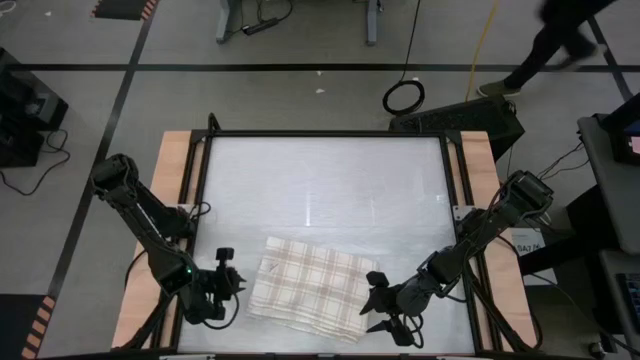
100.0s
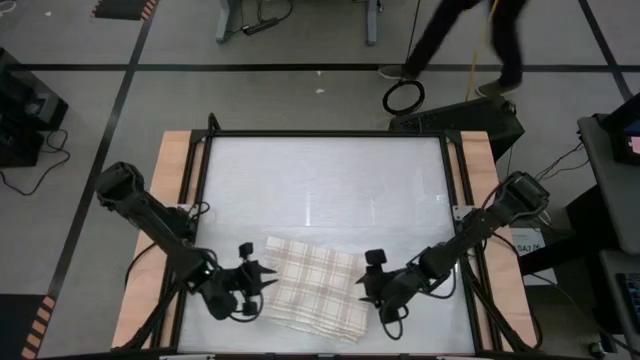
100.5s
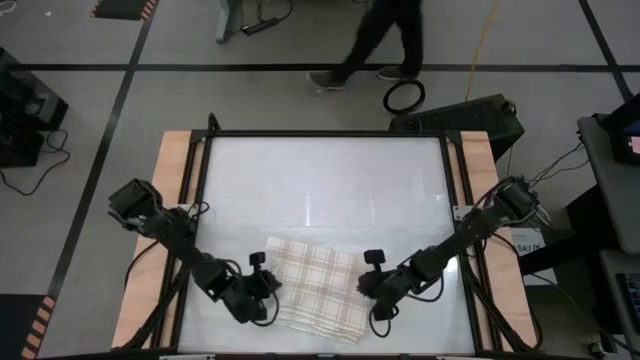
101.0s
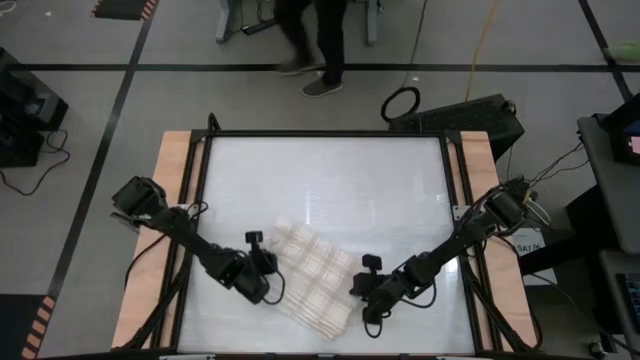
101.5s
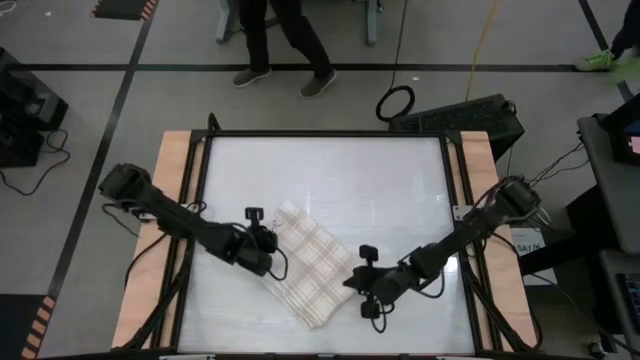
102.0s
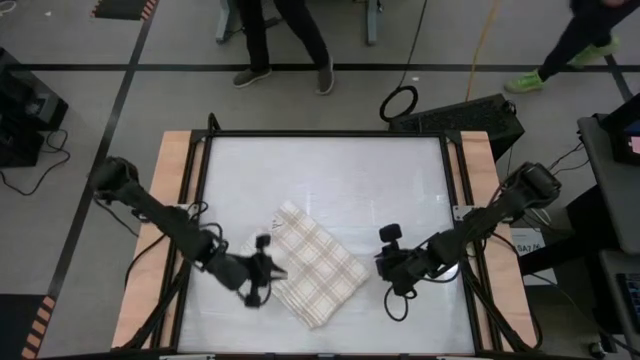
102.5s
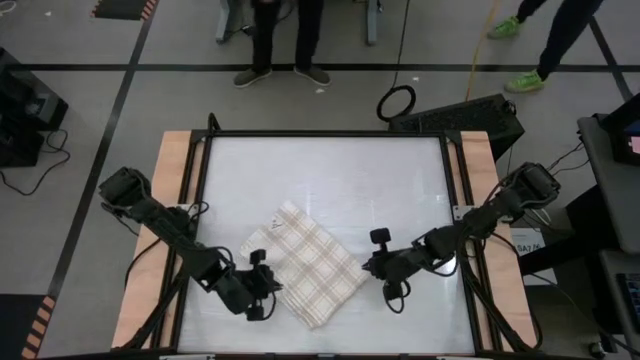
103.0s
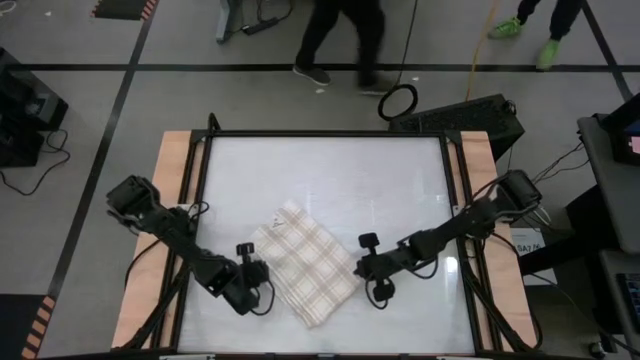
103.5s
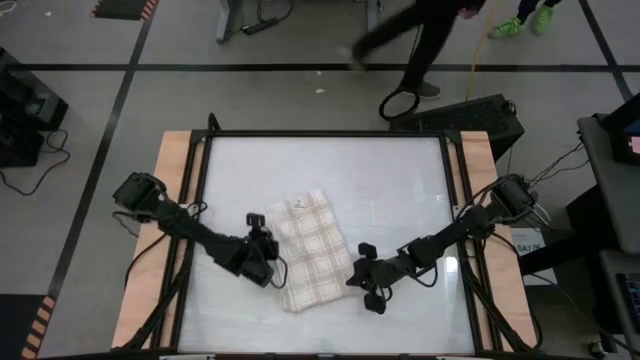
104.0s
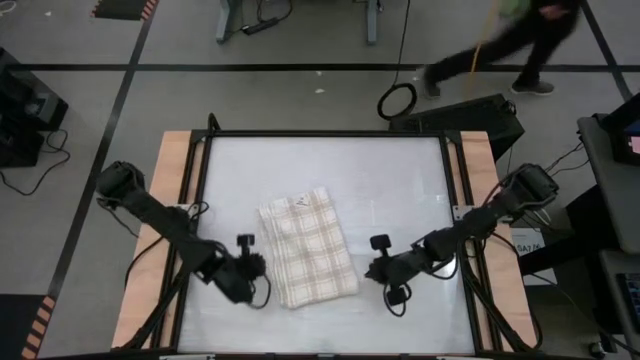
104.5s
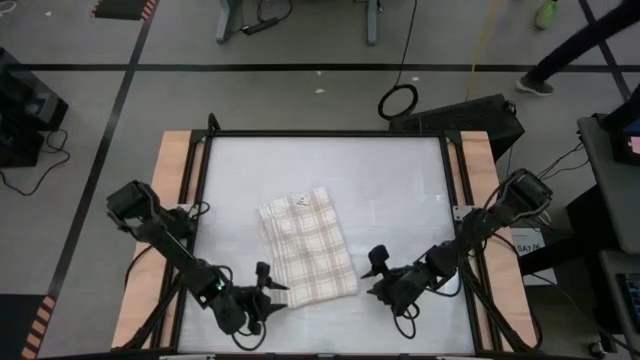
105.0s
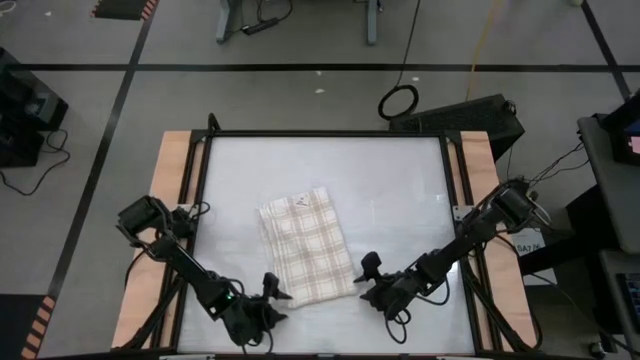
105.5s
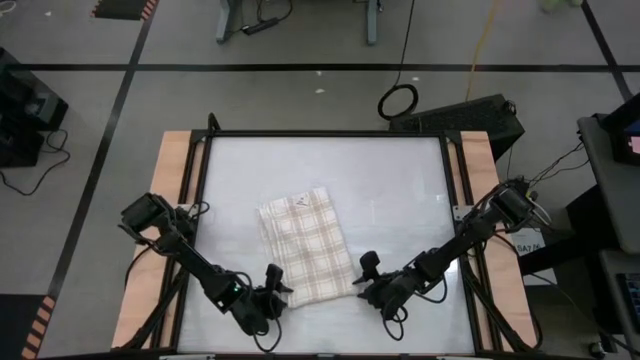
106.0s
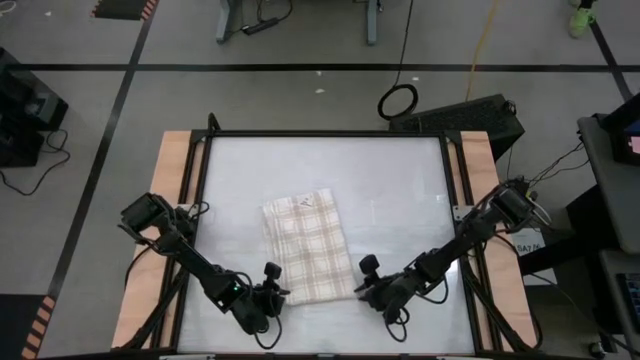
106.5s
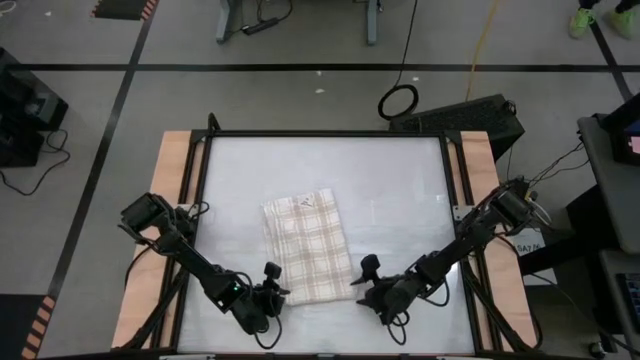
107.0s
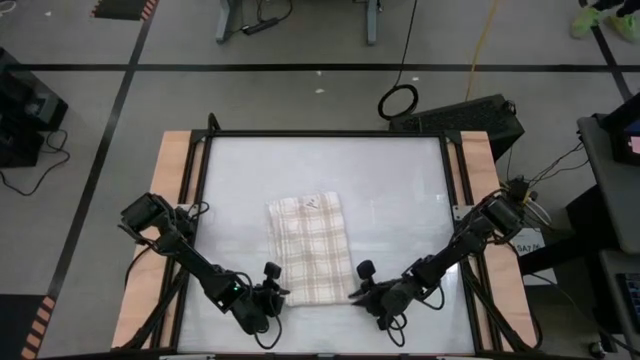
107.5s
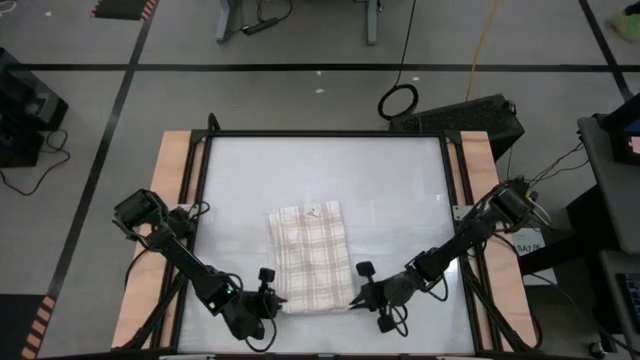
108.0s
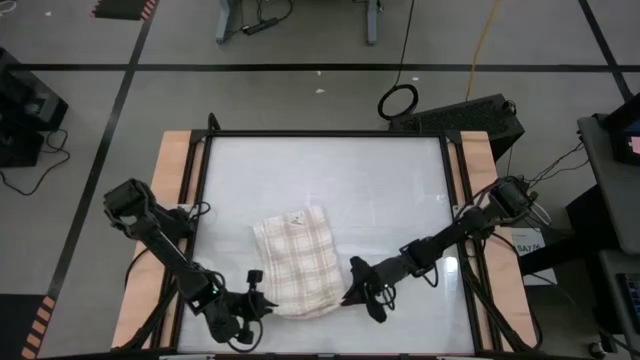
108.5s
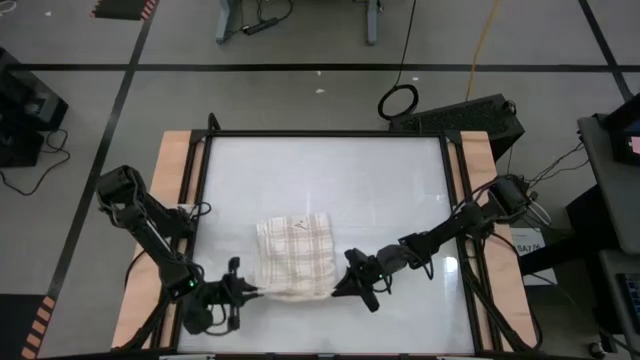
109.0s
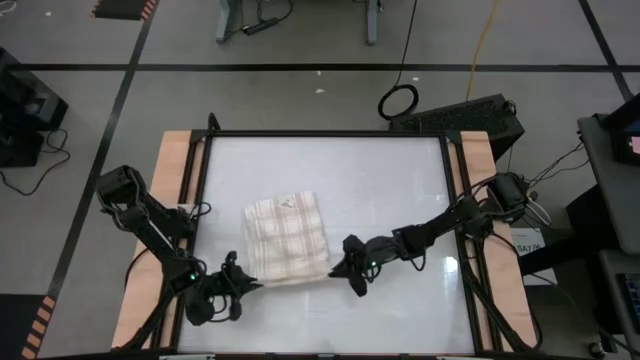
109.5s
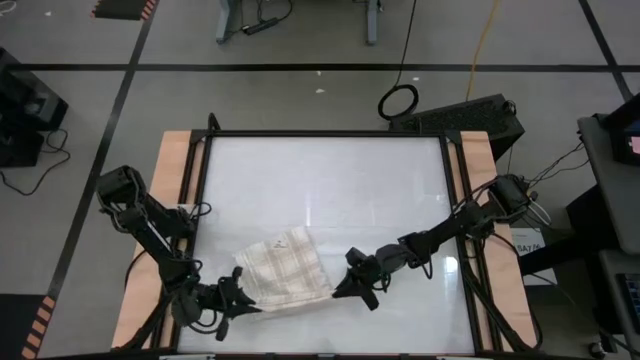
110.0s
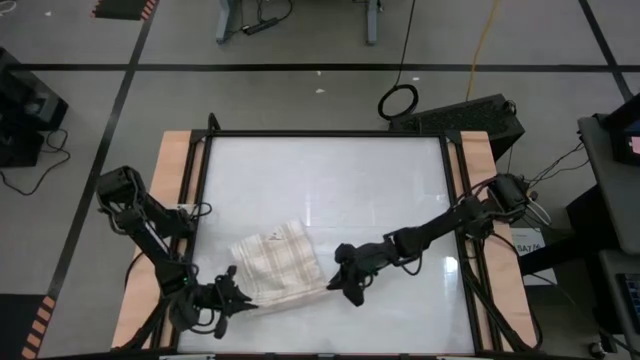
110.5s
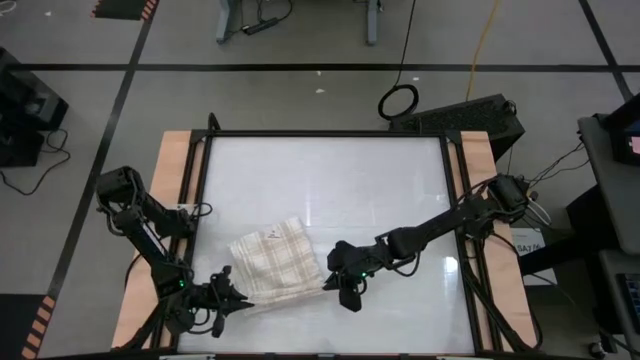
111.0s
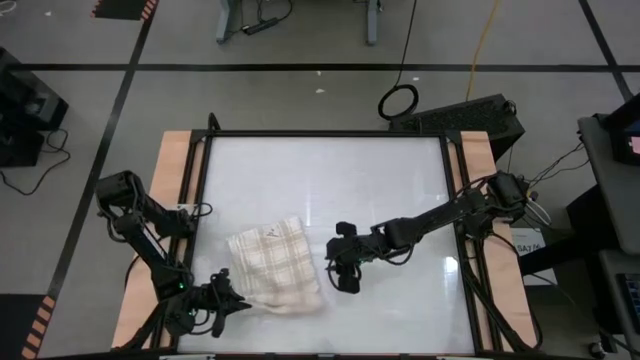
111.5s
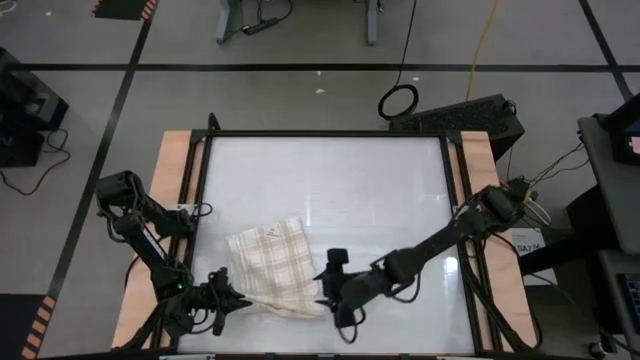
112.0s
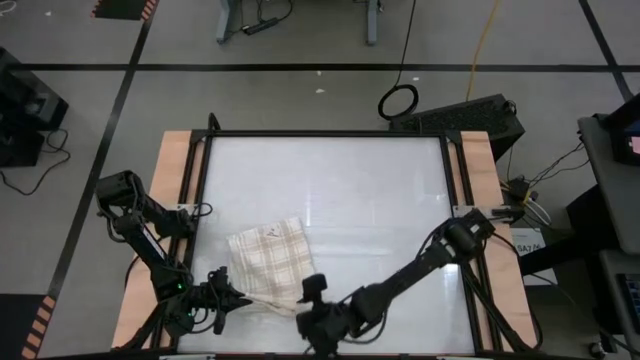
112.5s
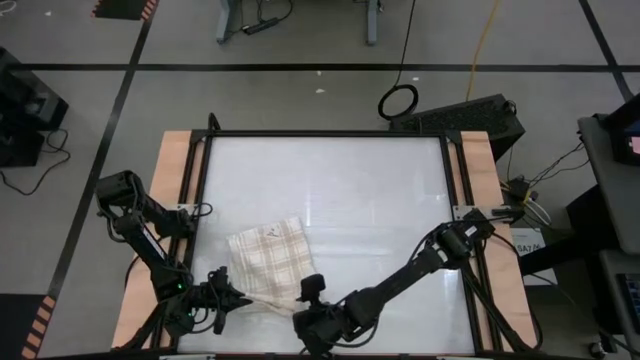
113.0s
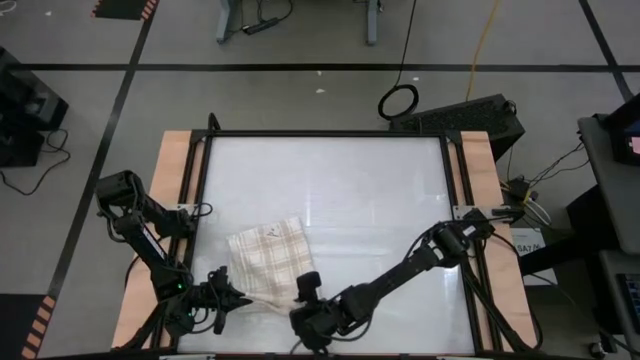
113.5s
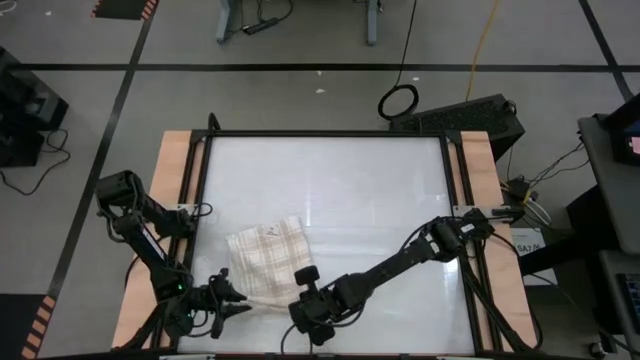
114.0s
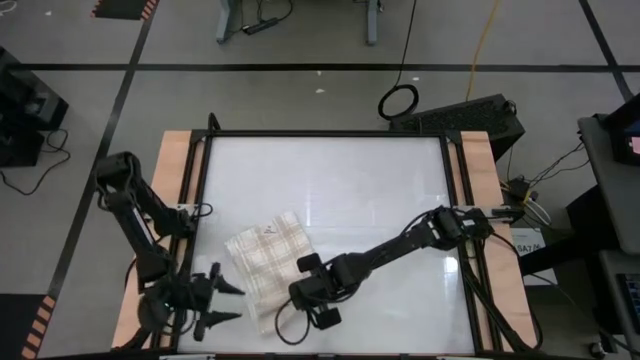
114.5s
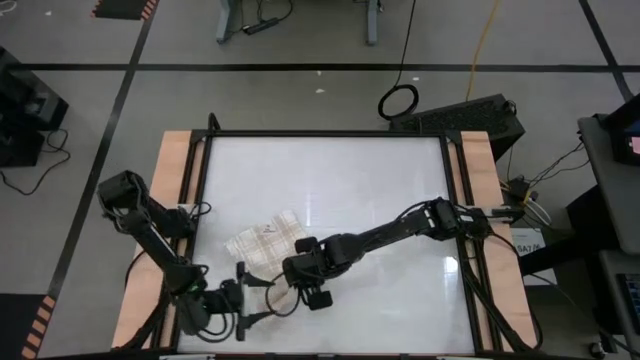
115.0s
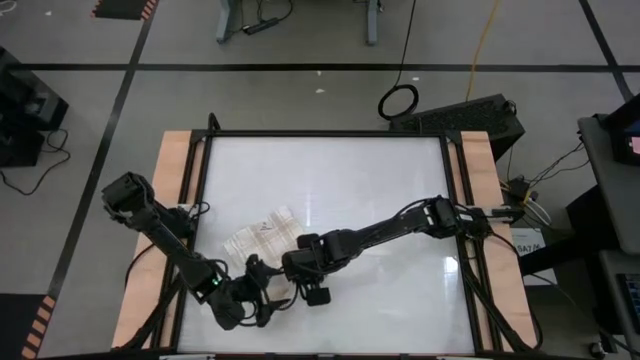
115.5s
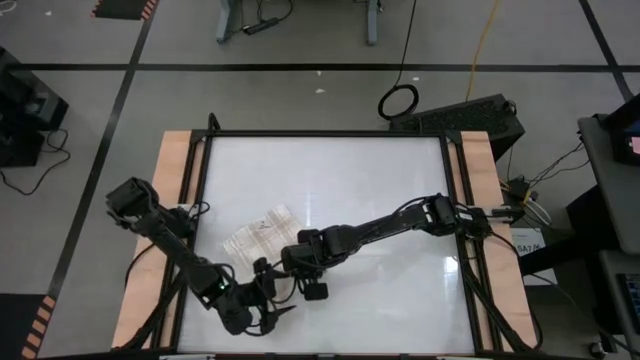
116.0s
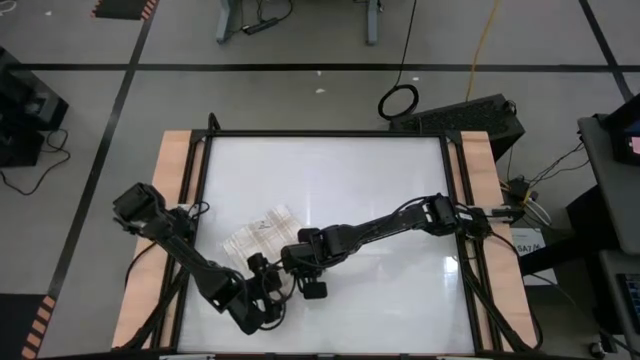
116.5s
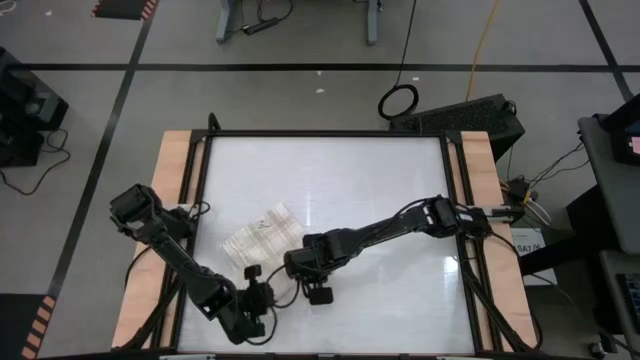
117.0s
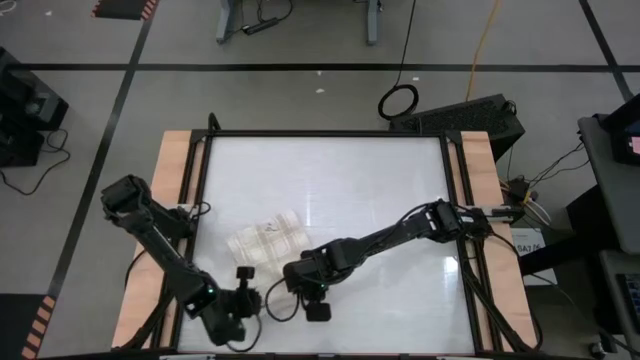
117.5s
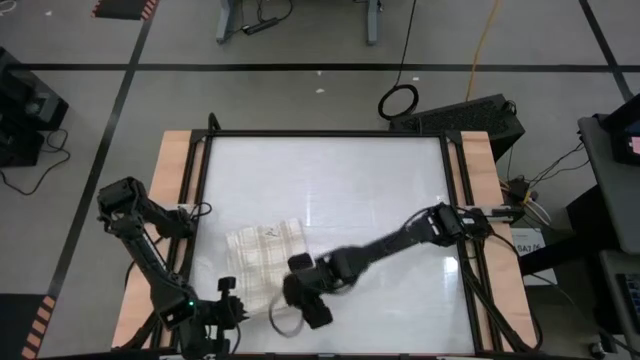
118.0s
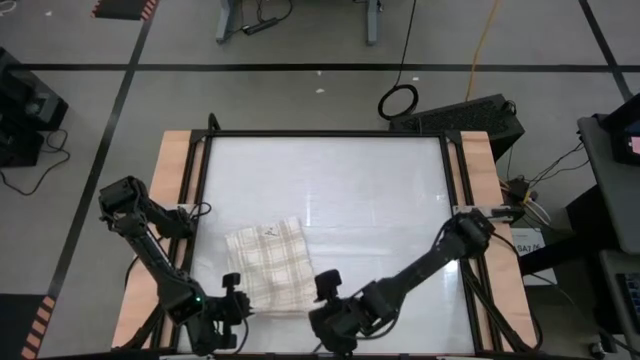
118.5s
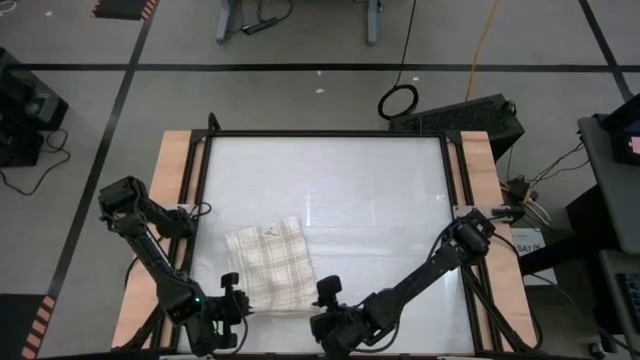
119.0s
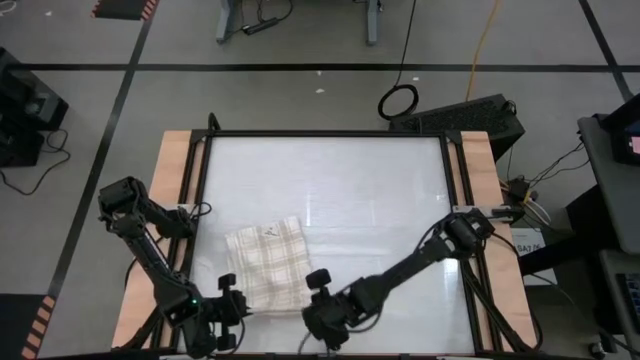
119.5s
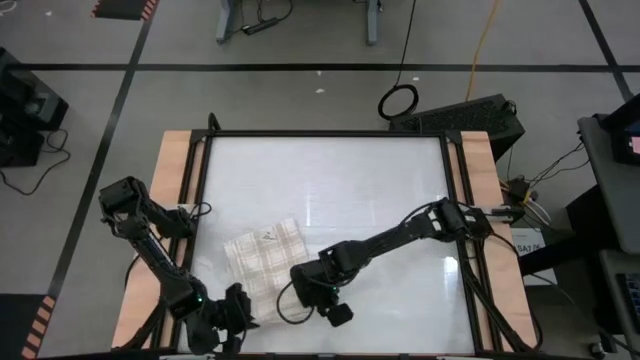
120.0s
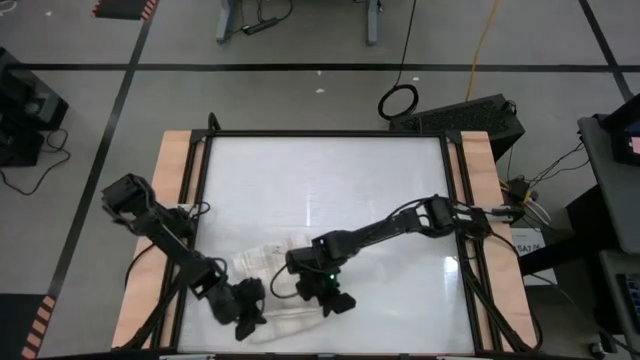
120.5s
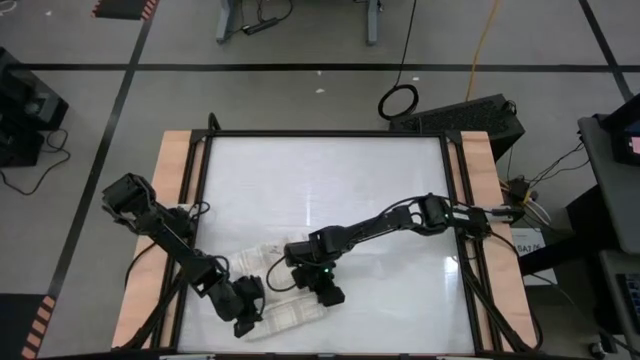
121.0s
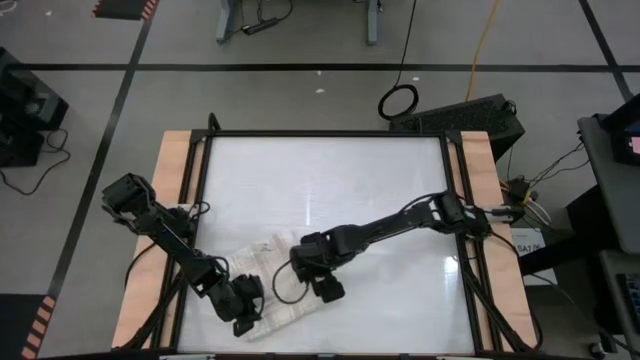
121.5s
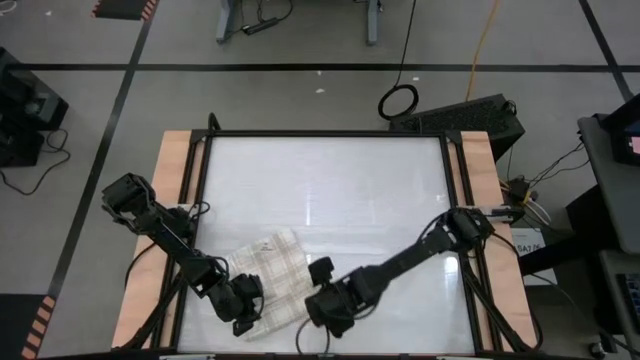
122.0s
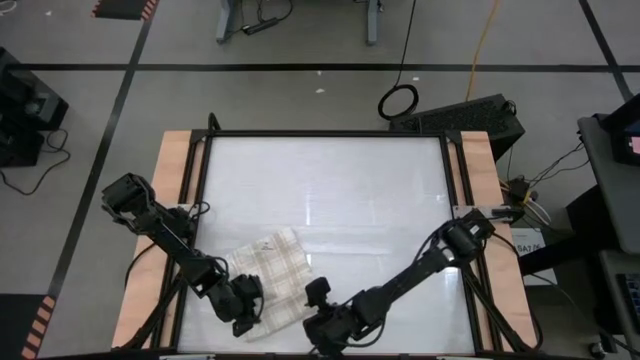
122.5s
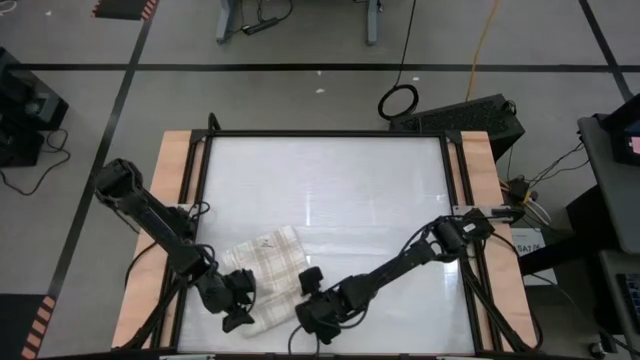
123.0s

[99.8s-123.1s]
Task: Roll towel
Roll the white towel
